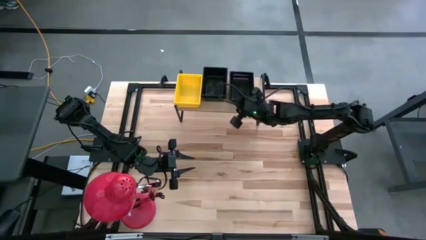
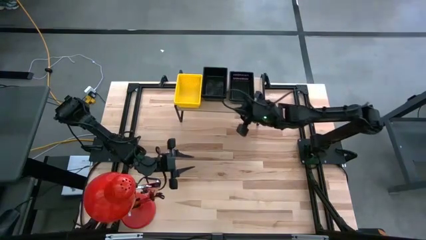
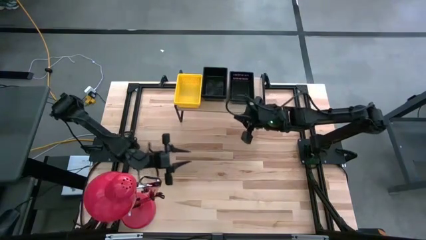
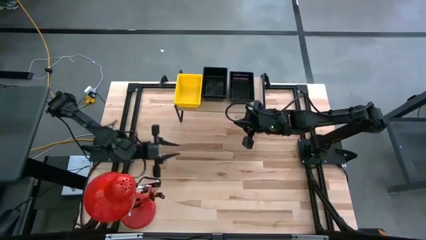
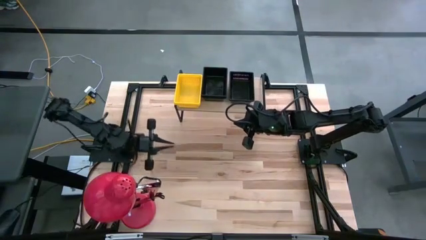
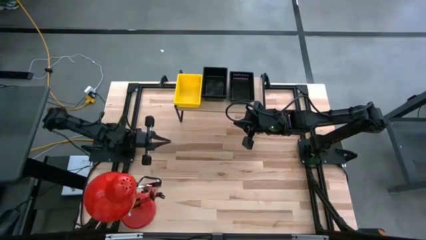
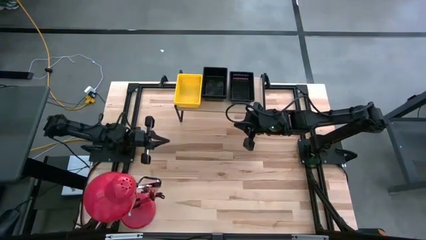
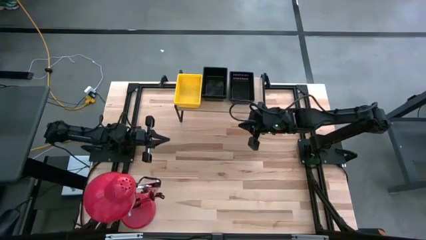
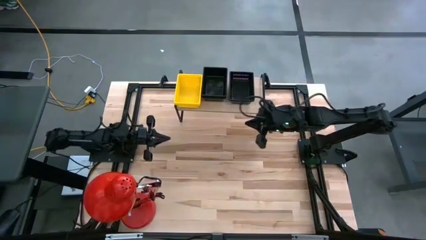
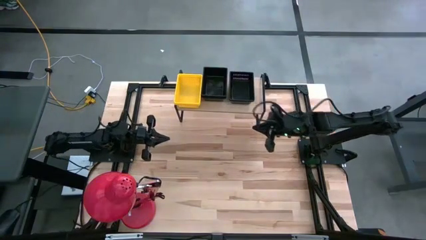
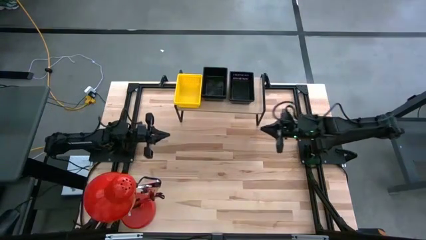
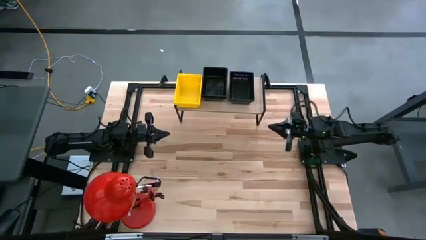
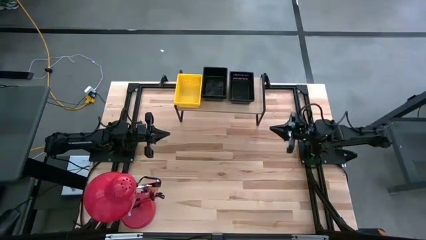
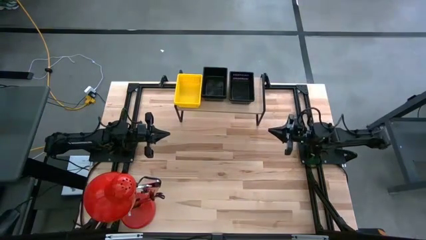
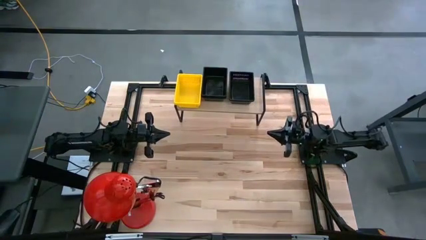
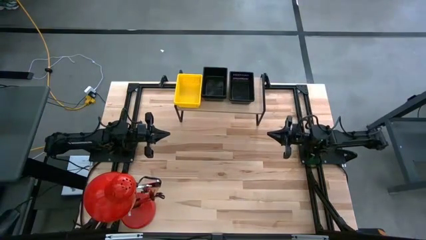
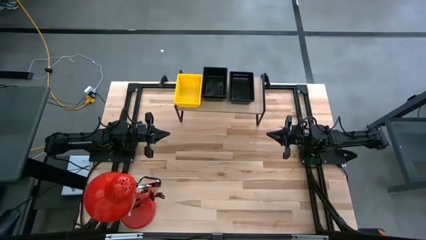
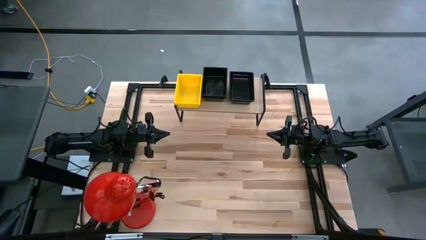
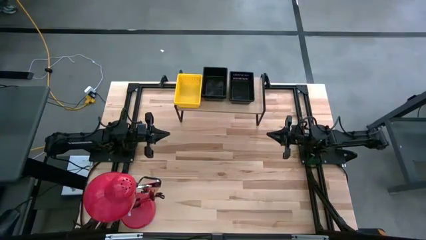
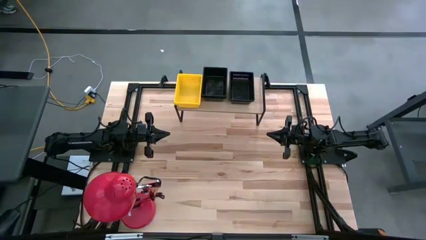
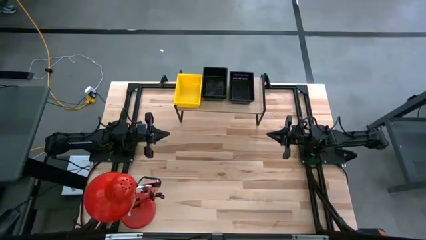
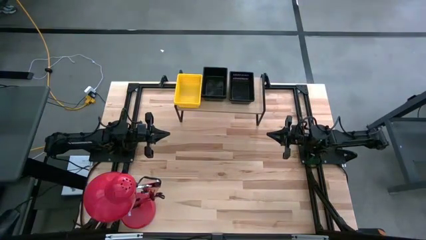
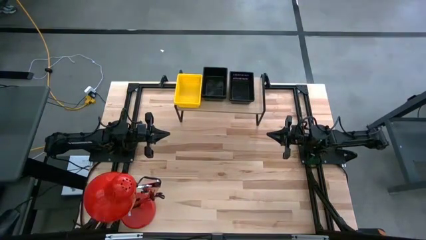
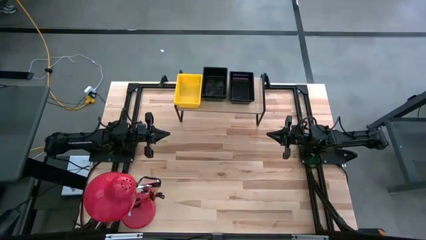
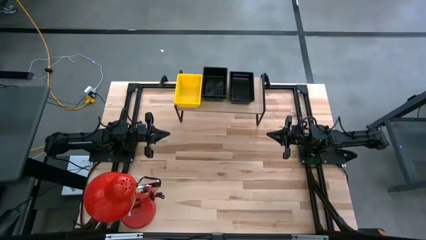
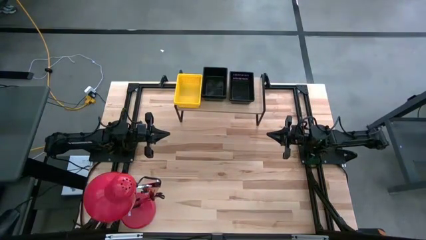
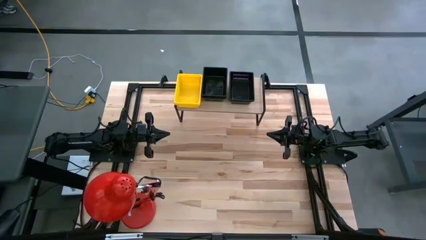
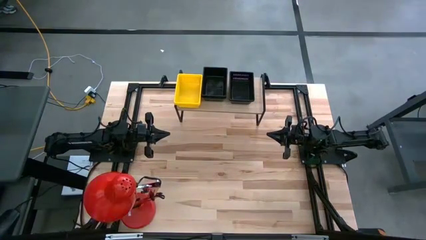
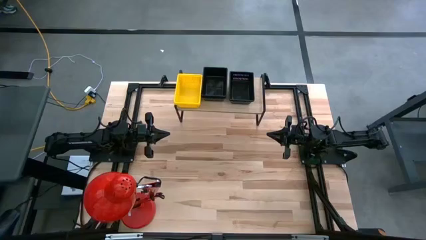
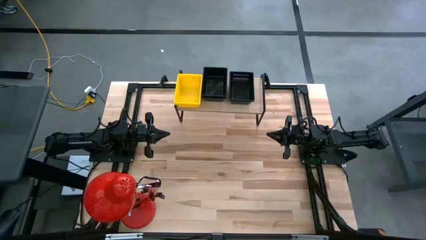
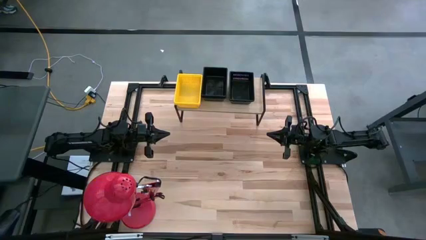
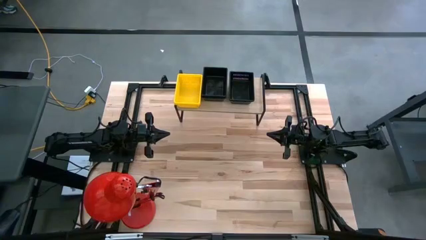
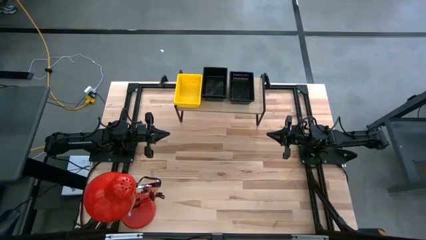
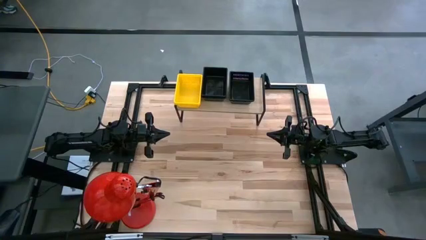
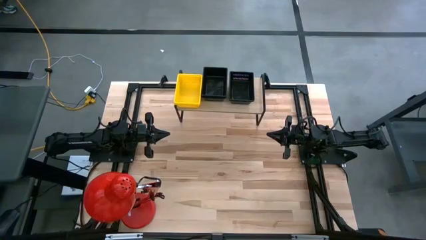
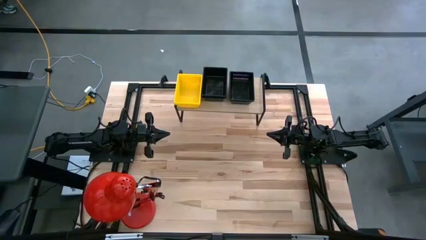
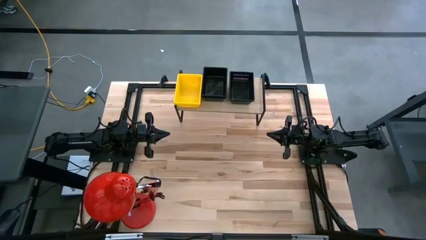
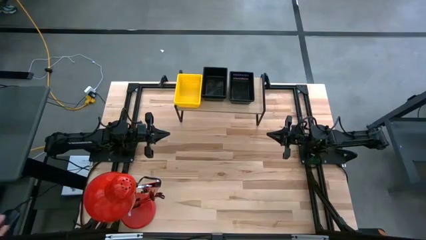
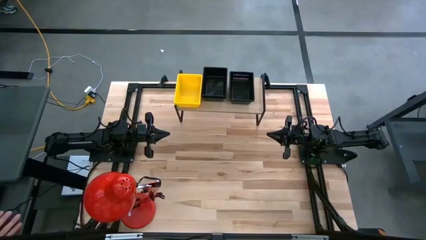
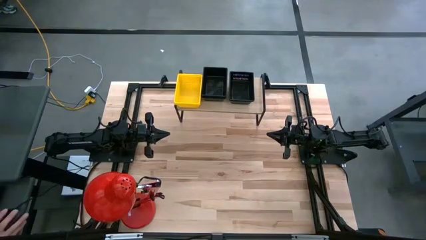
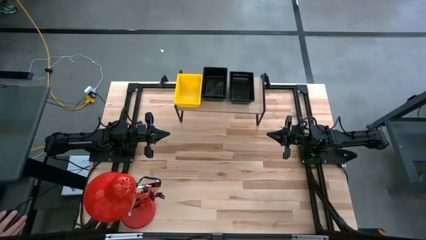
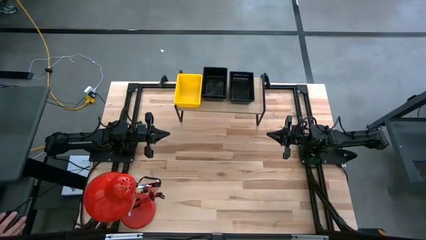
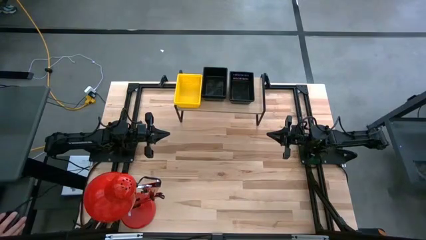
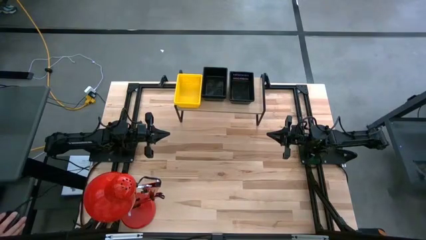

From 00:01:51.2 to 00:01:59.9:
Task: Stack baskets on shelf by color
Return to Home Position

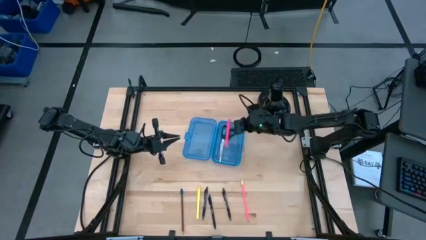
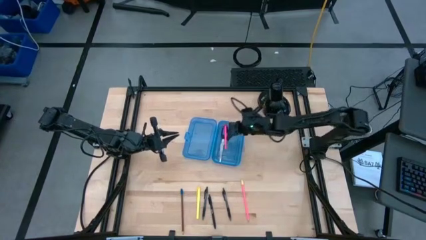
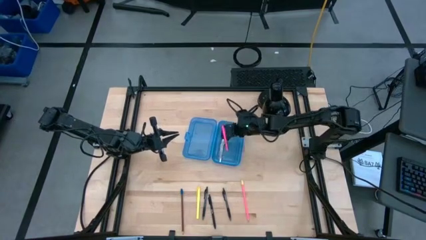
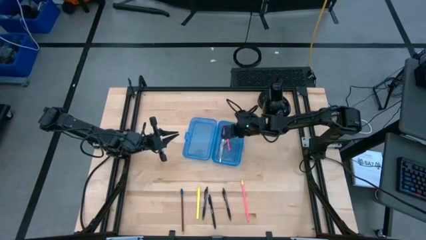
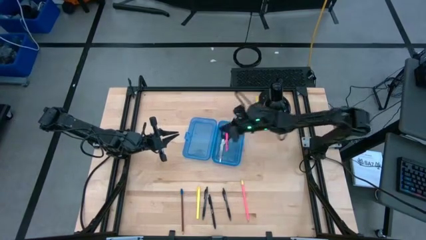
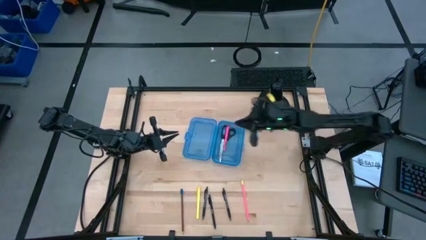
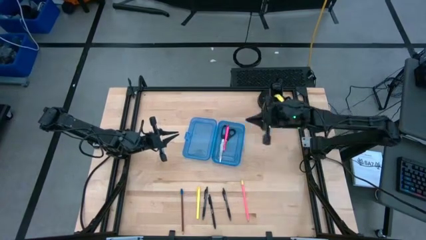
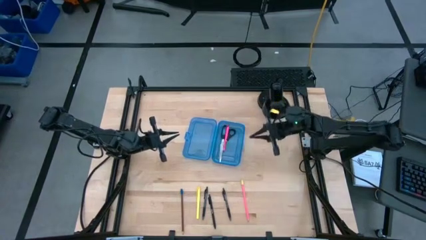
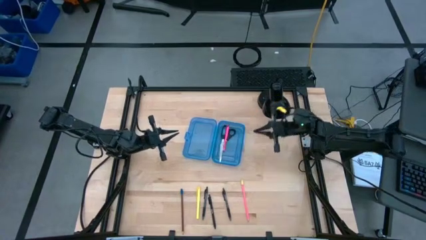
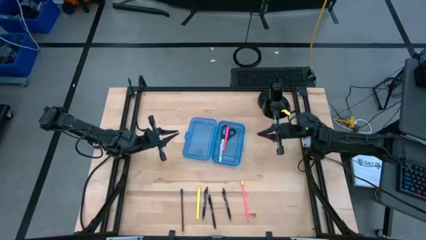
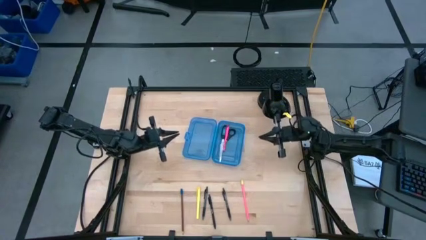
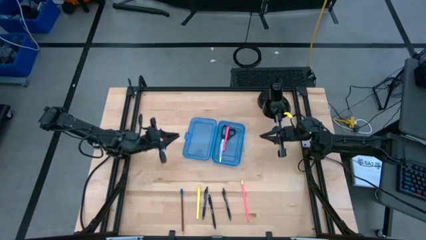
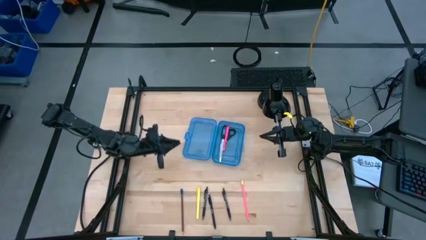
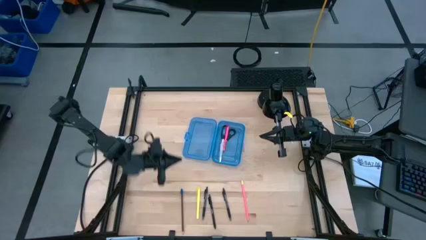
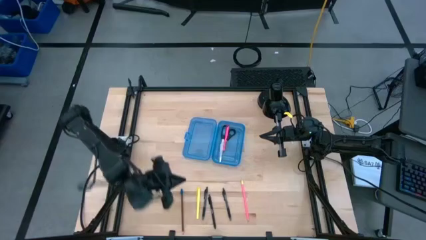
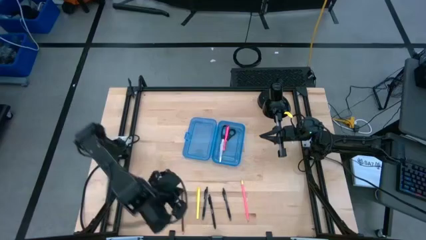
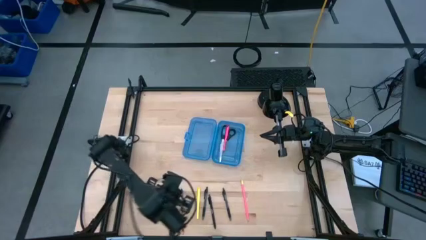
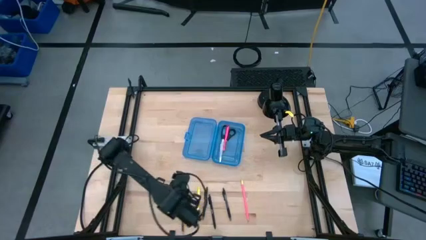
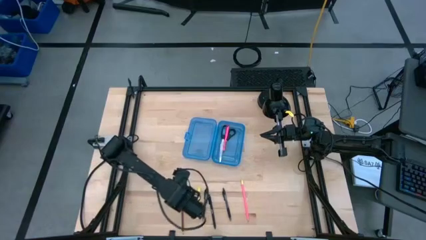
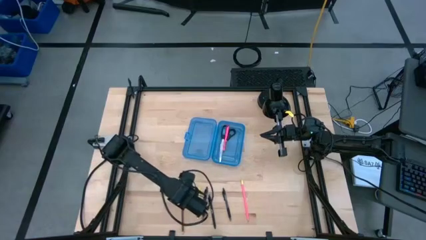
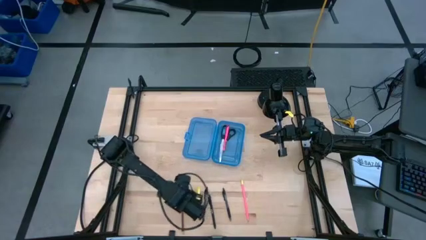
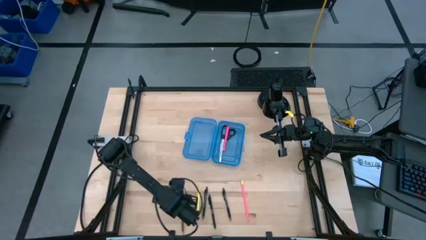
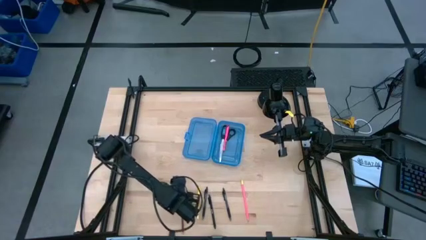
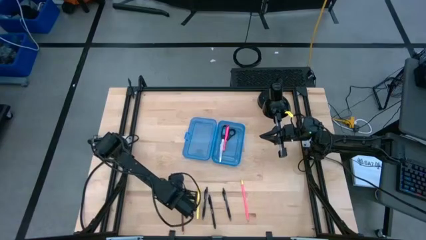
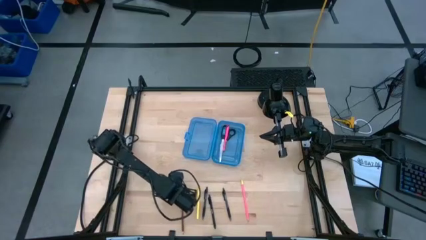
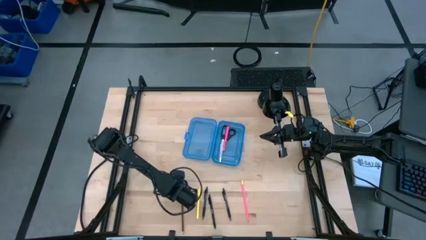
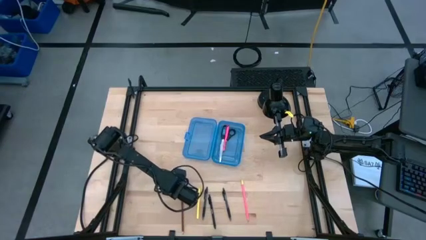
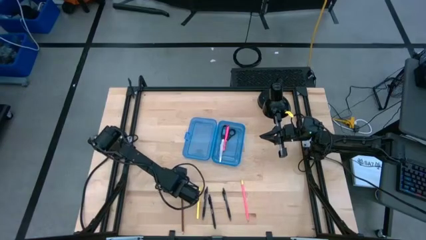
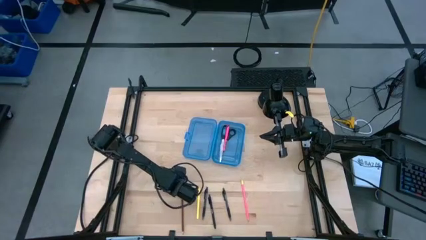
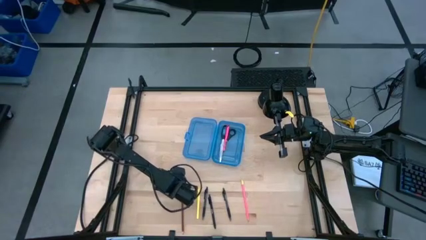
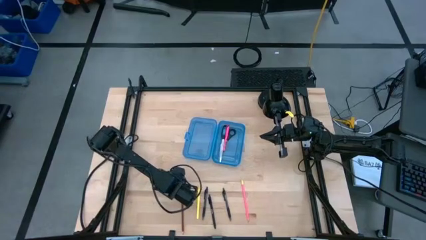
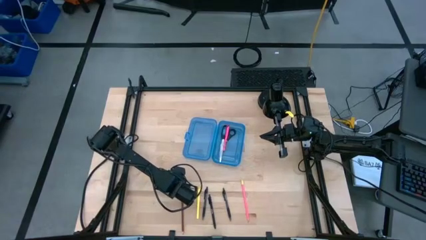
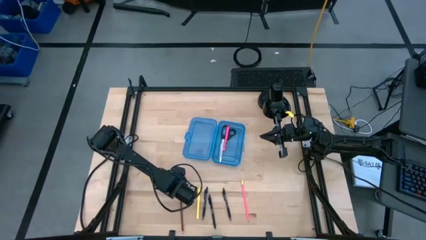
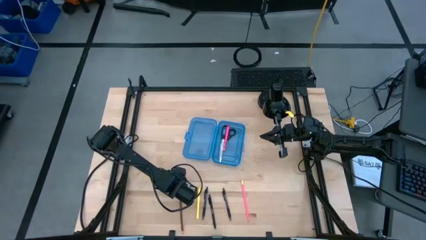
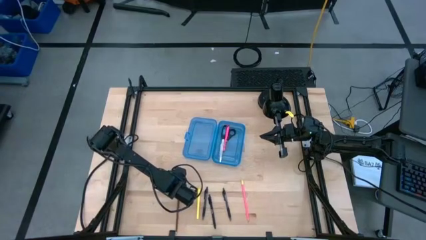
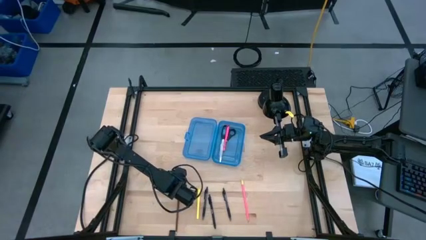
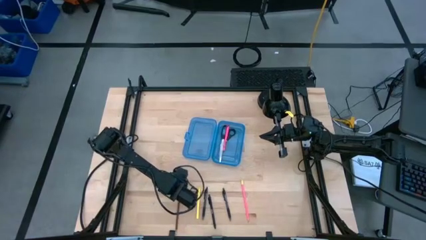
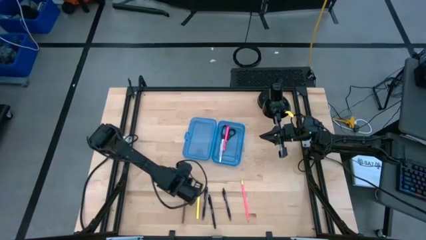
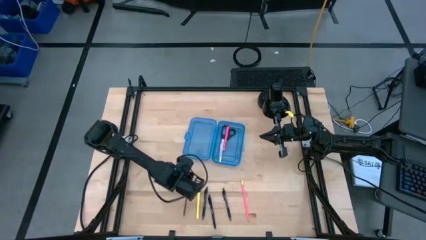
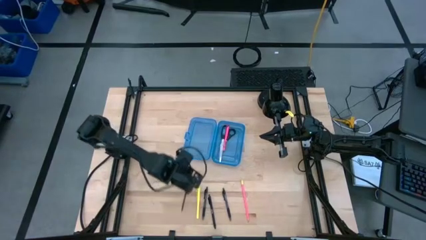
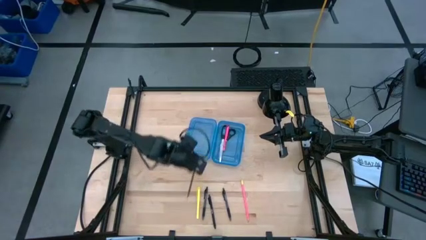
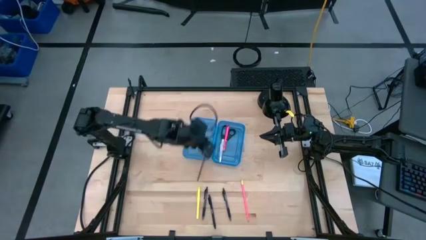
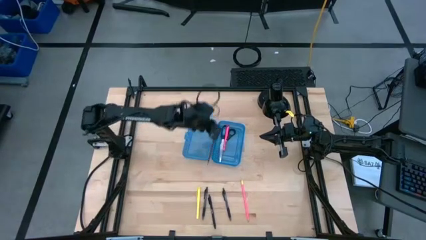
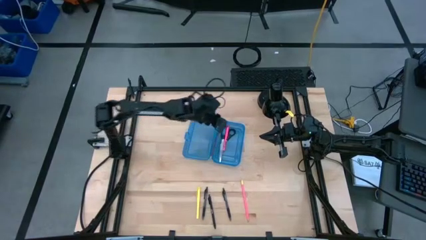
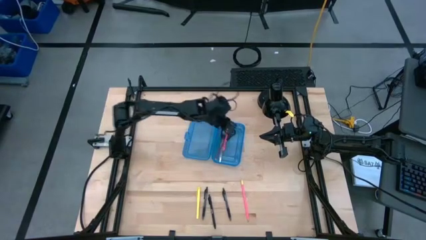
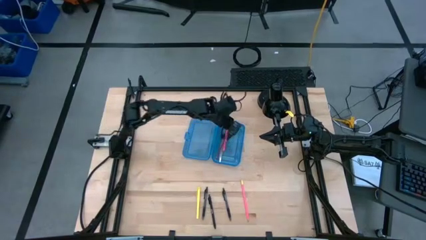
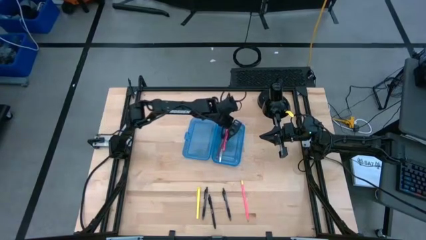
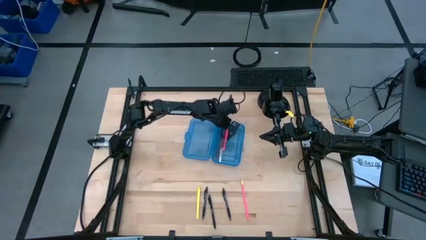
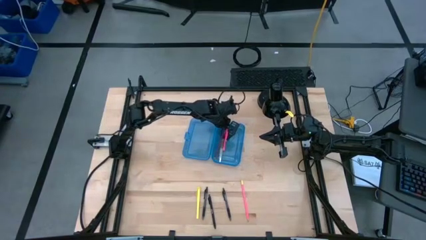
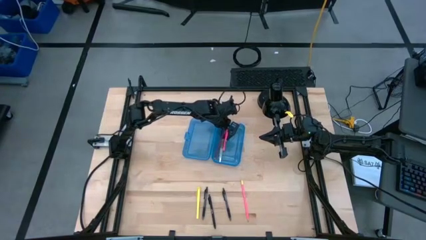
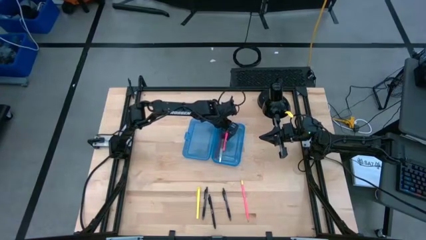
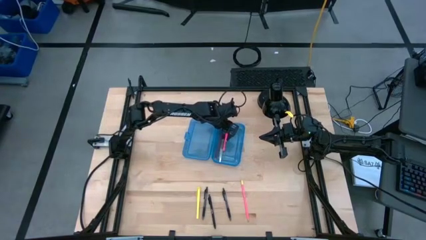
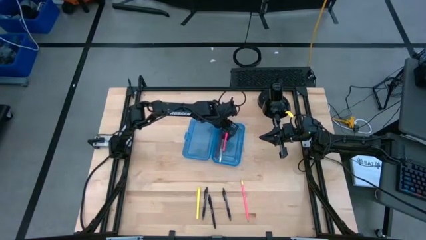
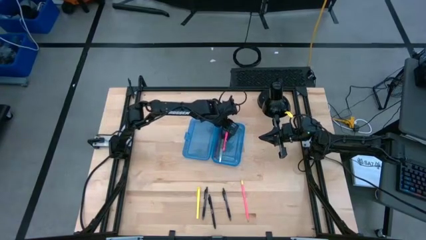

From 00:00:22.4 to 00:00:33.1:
Task: Pick & place school supplies into a supply box
Put the brown pencil into the supply box
